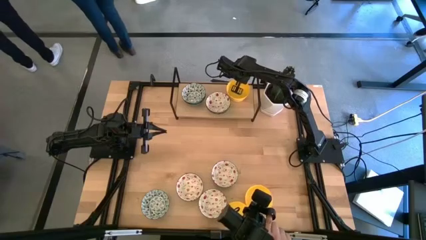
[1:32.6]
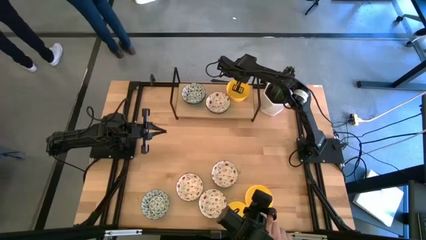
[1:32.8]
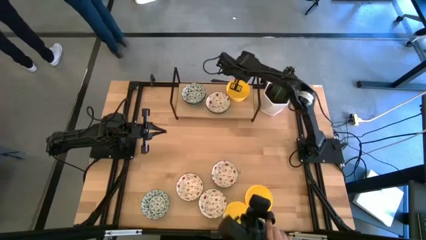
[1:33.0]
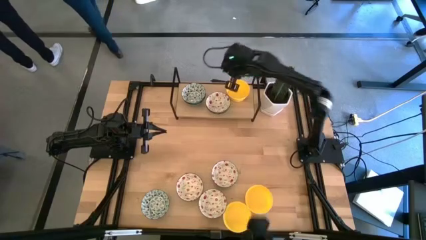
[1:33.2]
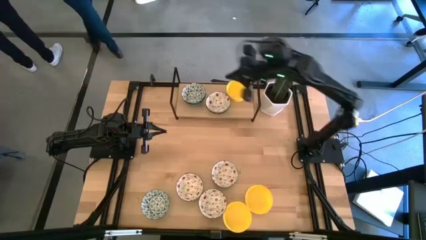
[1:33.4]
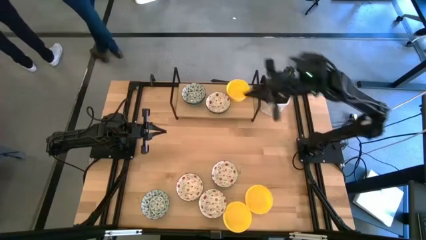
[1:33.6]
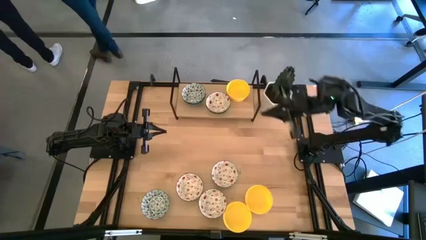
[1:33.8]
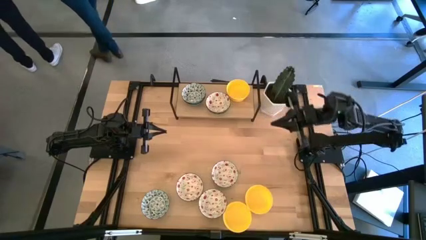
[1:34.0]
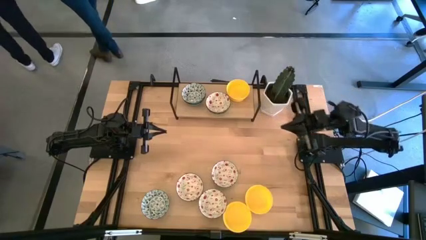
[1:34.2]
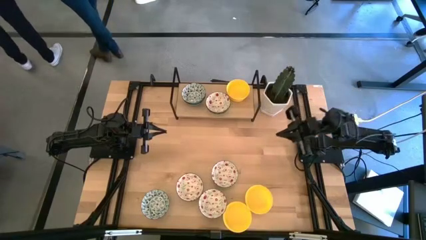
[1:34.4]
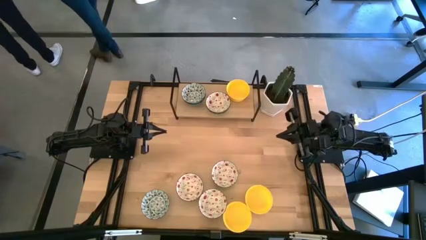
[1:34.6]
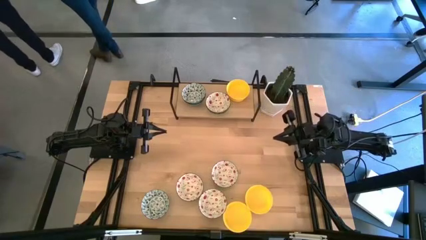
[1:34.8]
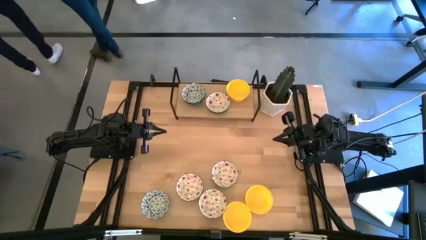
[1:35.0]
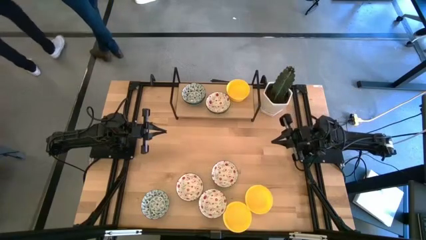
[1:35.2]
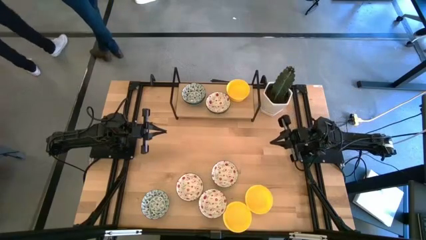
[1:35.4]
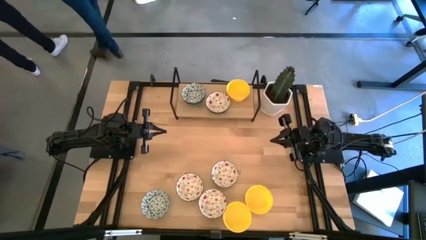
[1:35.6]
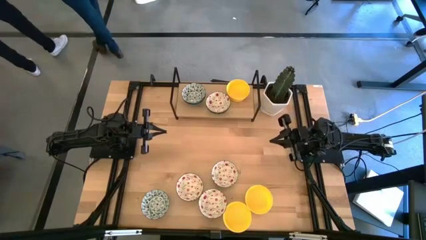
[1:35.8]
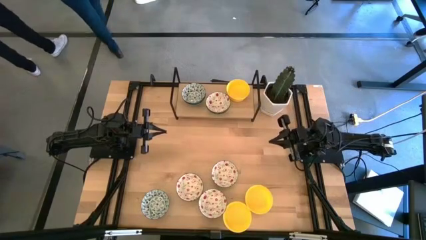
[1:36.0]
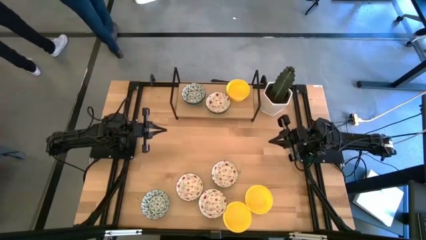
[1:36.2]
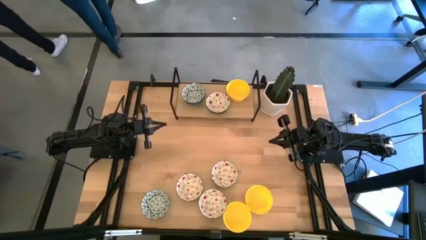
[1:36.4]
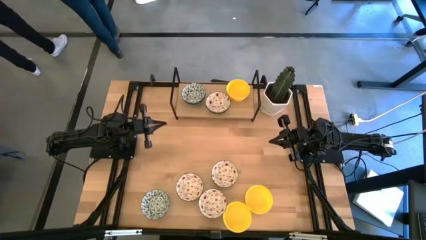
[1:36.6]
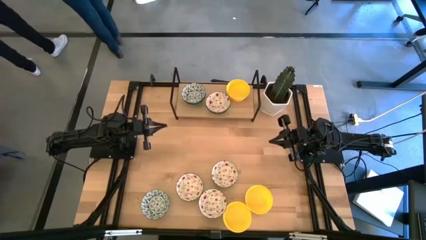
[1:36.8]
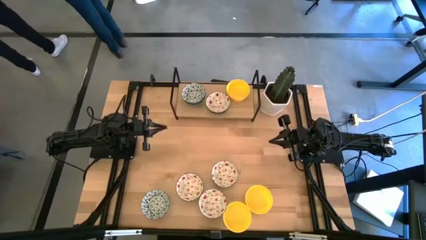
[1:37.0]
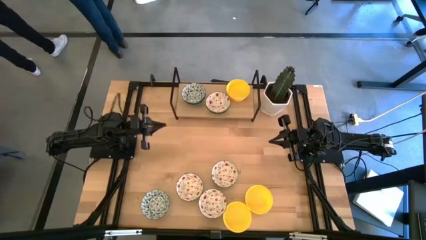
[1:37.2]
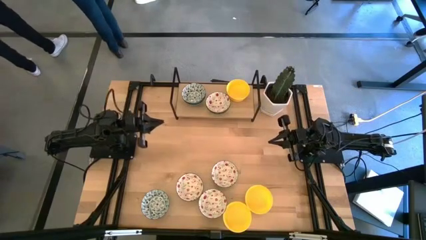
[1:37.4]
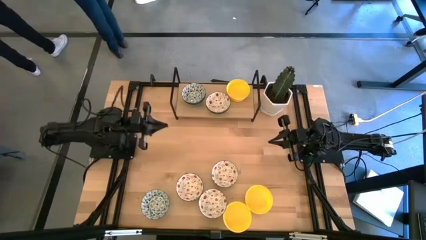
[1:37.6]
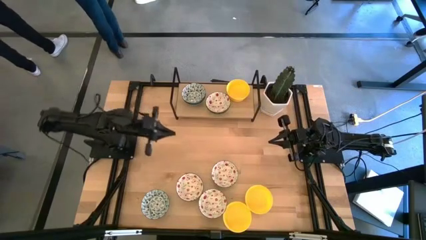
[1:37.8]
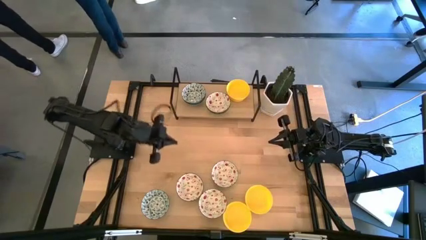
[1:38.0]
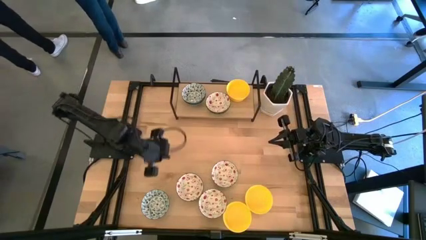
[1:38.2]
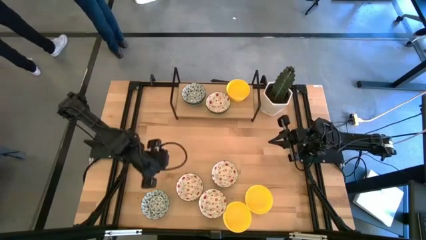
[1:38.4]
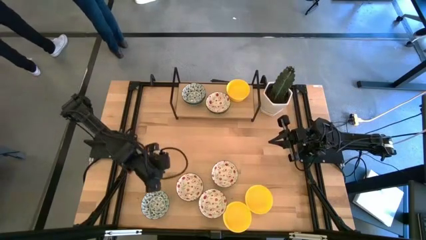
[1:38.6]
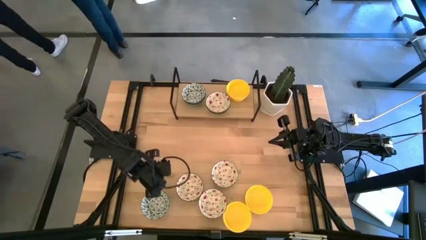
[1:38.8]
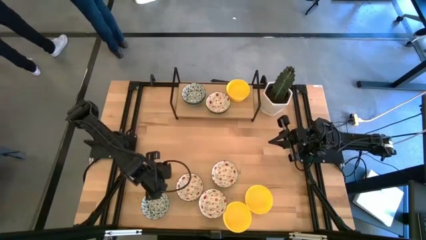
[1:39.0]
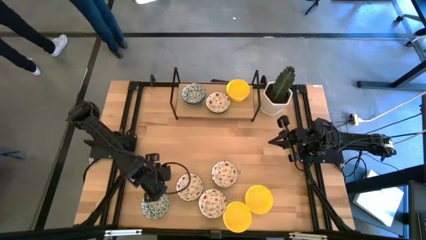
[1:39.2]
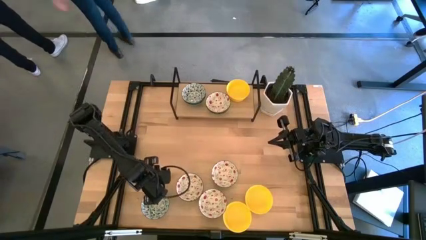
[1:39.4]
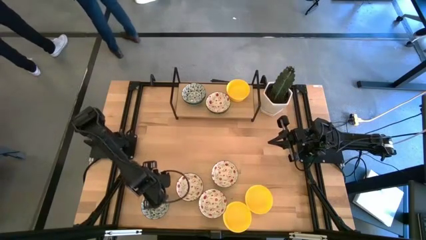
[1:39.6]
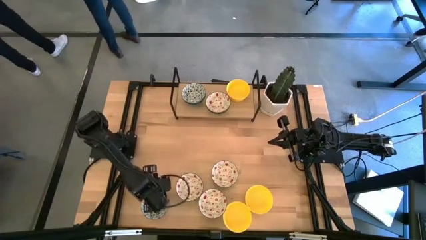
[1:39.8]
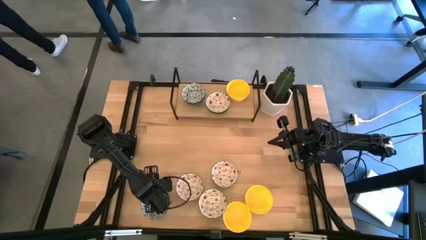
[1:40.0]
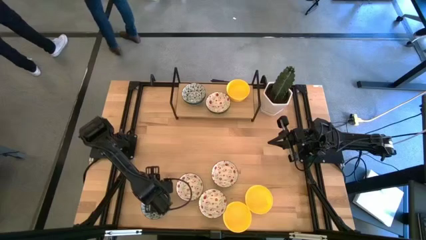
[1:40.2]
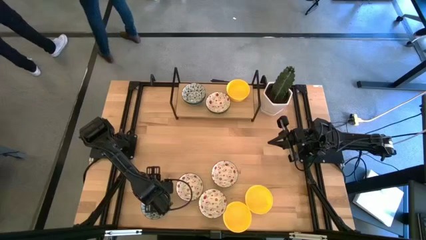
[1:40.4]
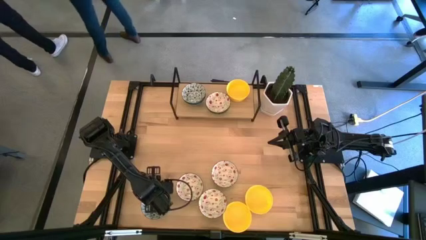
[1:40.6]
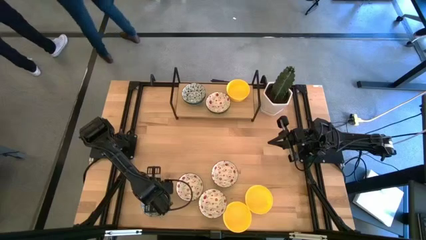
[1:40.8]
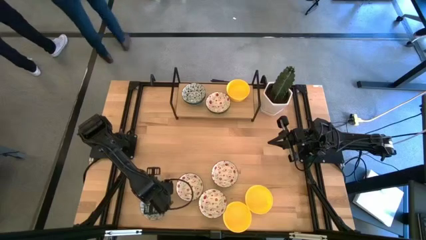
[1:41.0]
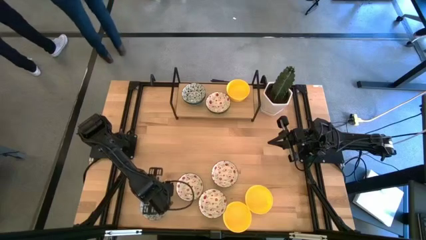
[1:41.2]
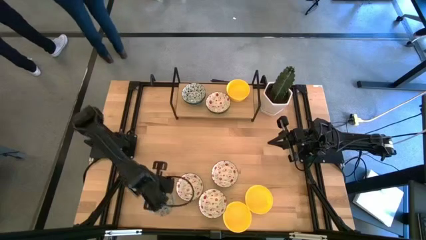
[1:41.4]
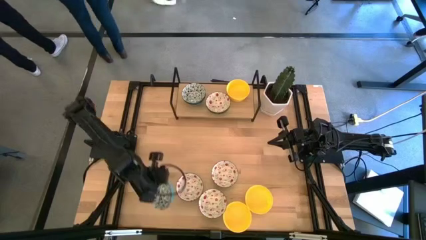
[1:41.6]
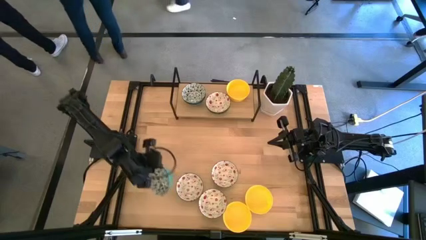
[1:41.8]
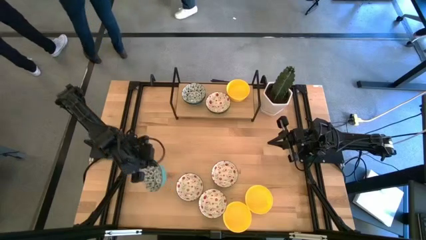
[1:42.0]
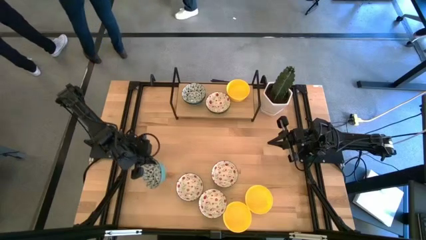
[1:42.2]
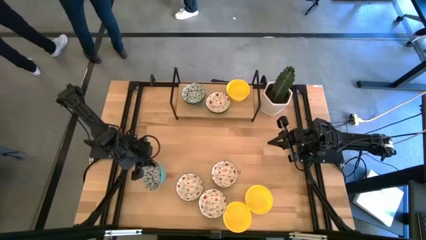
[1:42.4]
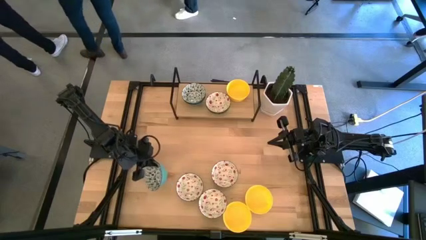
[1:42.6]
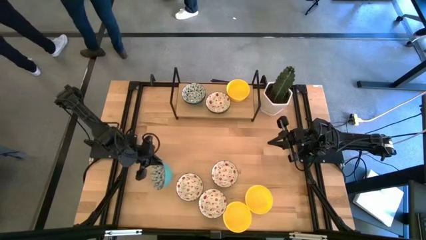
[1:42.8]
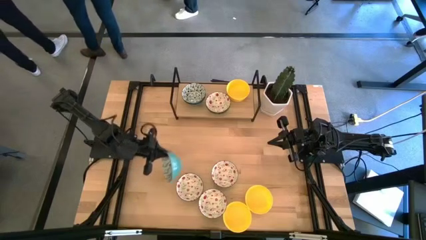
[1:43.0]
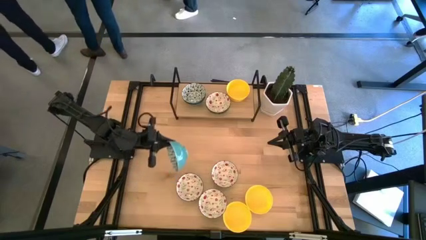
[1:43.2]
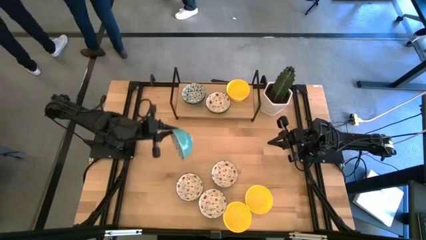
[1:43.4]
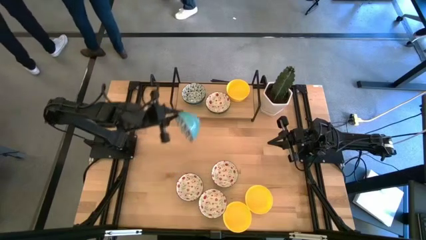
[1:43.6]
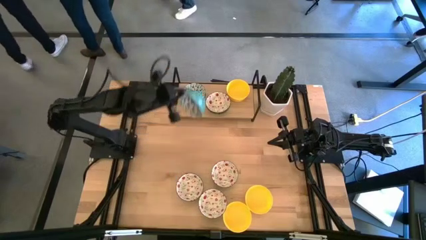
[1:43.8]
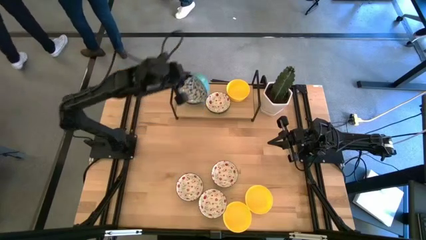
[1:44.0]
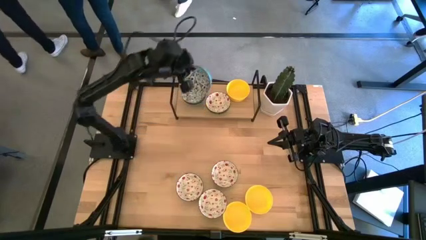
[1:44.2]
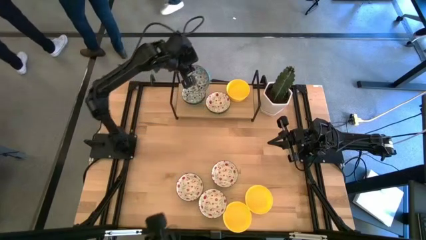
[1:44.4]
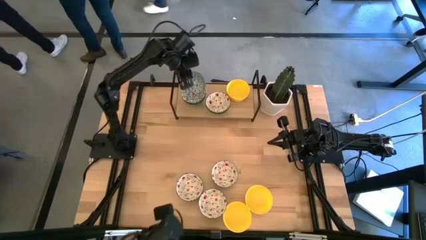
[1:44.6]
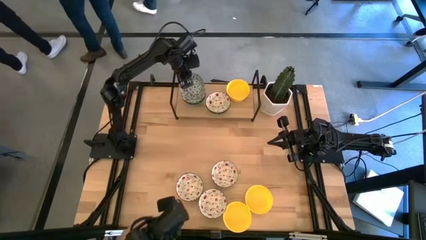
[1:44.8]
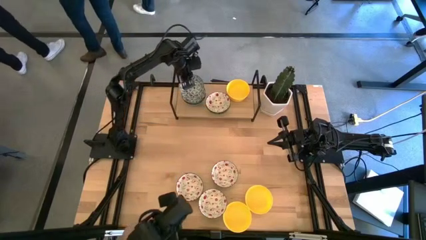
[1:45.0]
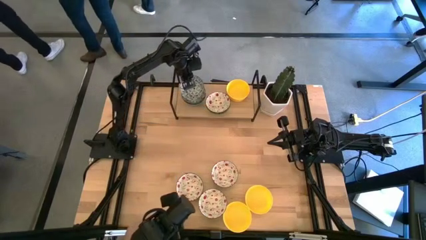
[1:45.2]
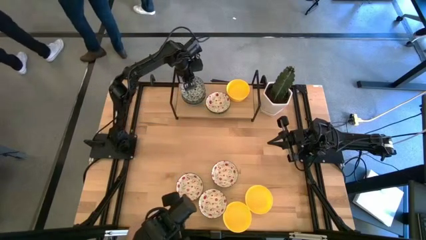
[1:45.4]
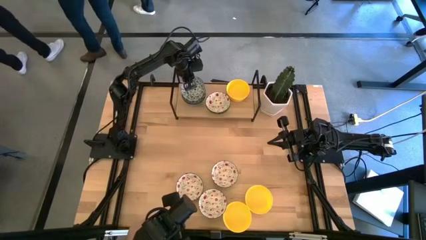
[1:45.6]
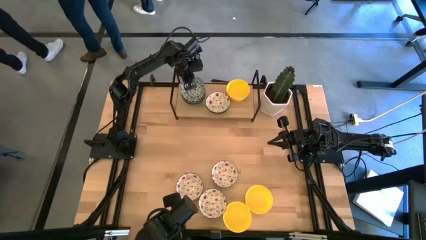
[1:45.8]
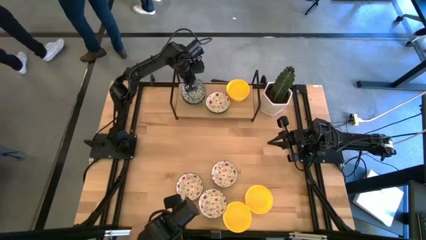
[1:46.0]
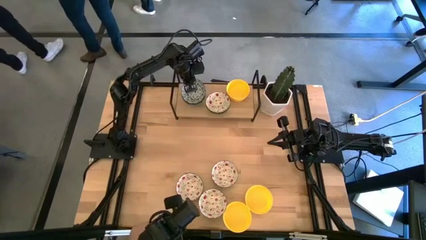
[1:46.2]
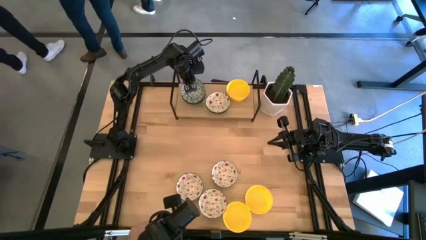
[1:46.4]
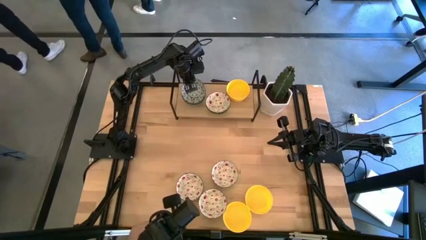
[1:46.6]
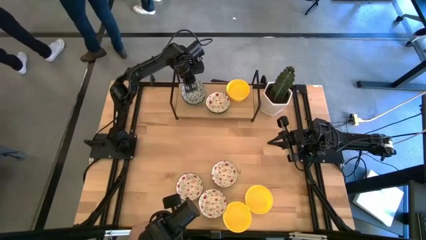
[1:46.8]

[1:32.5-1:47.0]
Task: Pick & Place Mini bowls
Stack the blue patterned bowl on the blue patterned bowl on the shelf

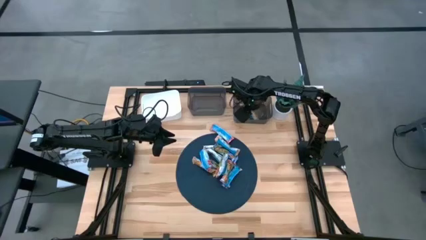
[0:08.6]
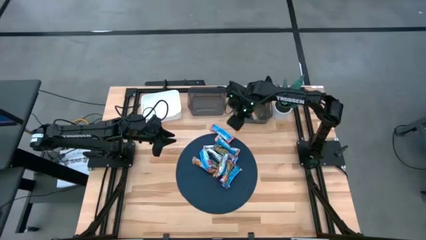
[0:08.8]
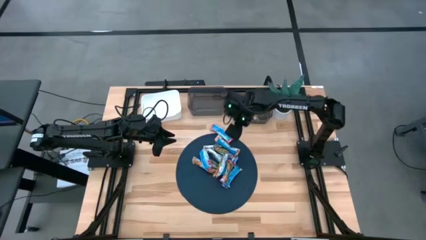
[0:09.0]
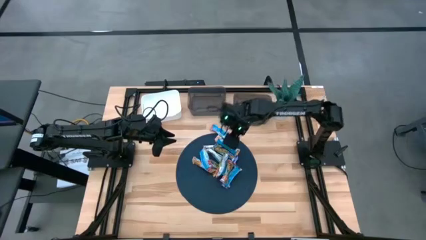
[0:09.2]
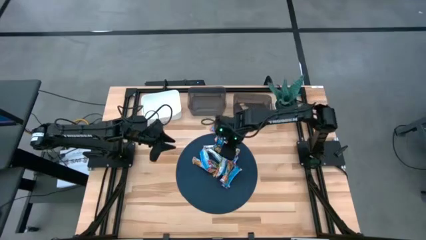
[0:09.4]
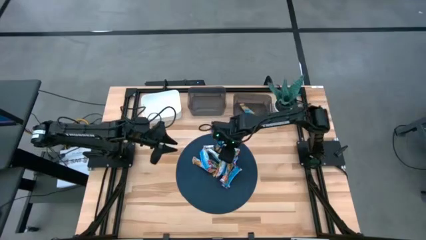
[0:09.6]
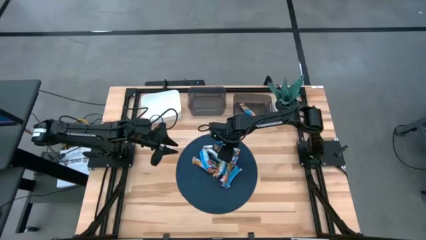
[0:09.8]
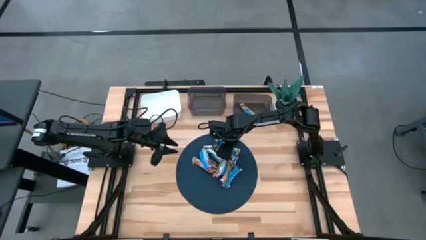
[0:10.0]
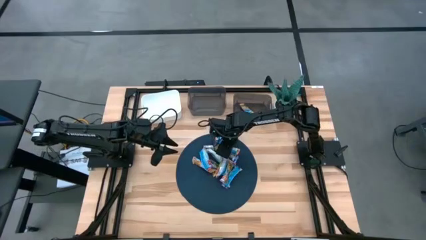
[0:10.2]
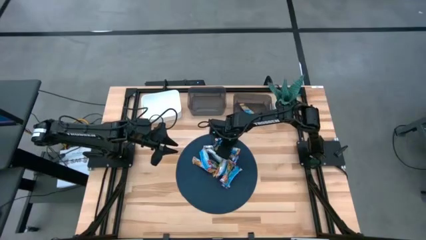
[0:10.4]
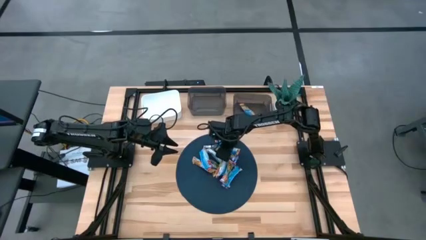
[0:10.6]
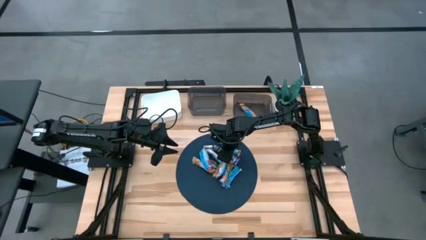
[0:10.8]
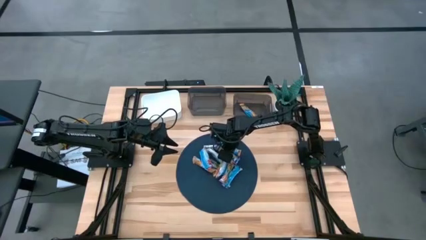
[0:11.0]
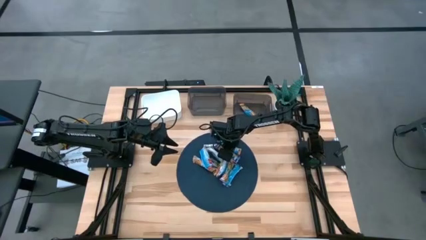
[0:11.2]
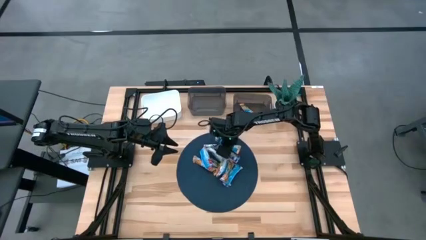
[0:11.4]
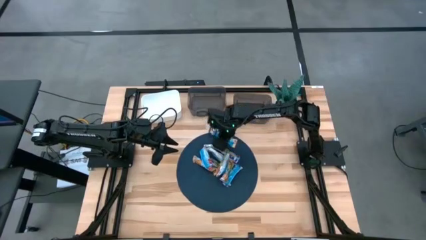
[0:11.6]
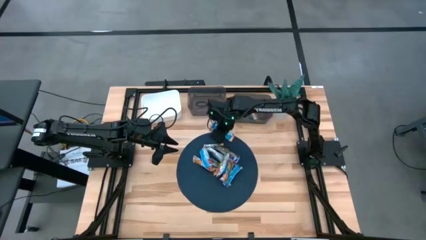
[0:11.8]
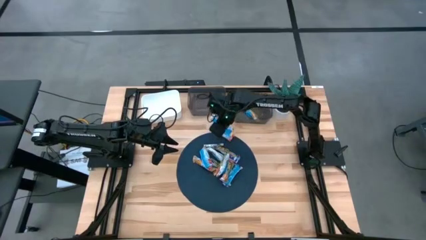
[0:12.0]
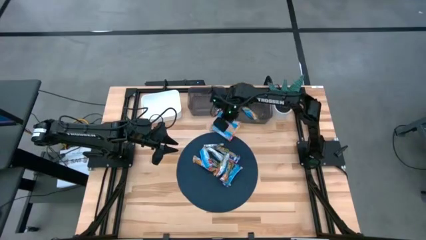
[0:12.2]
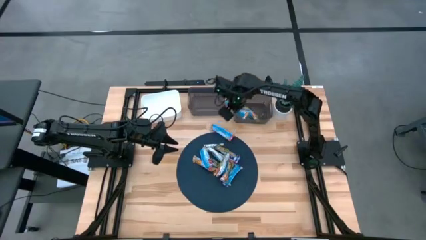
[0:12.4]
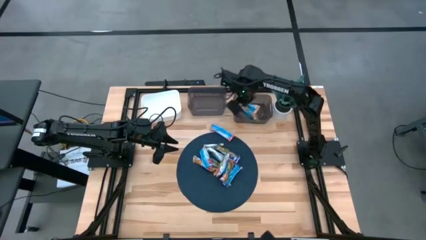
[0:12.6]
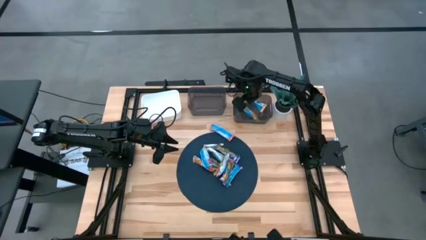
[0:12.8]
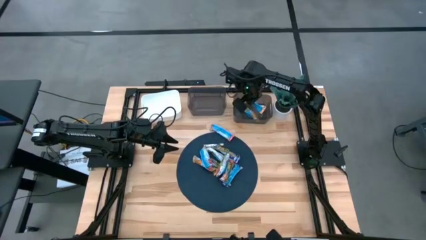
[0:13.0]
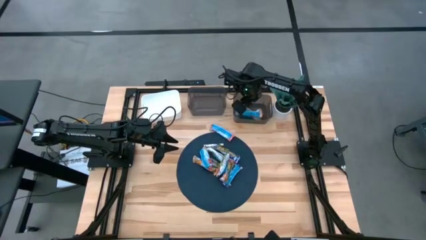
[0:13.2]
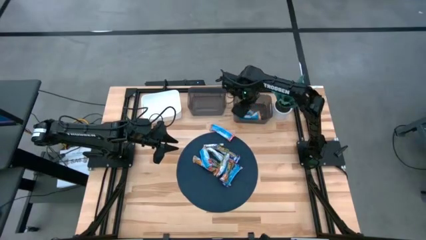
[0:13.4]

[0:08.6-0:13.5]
Task: Pick and place Granola Bars by type
Put the yellow granola bar into the right black bin
